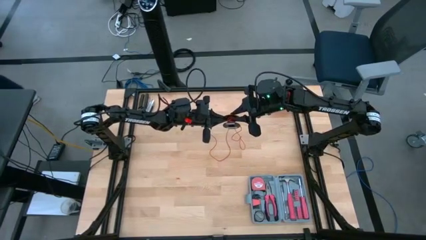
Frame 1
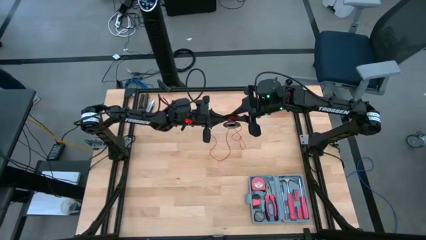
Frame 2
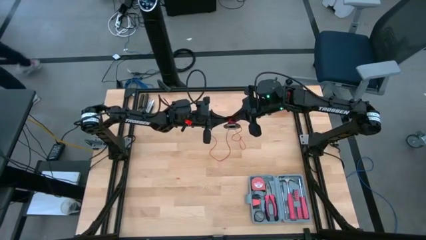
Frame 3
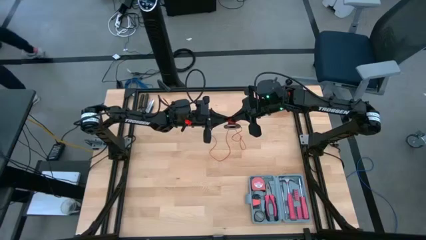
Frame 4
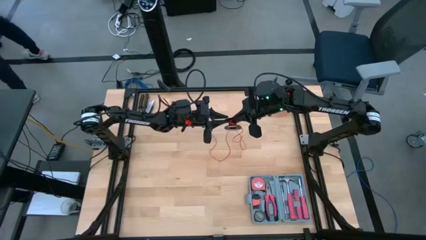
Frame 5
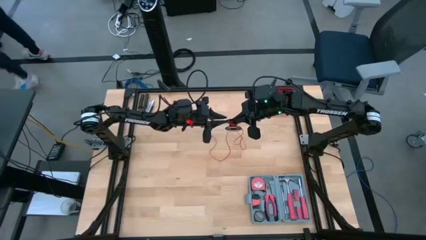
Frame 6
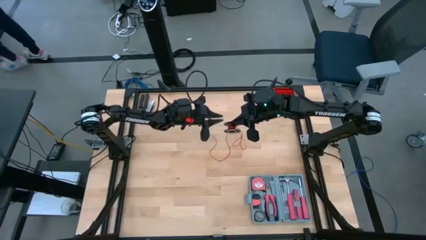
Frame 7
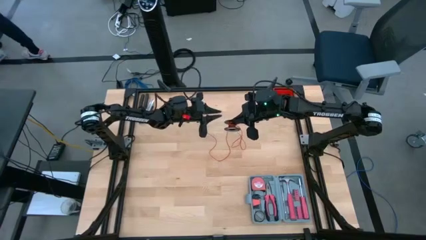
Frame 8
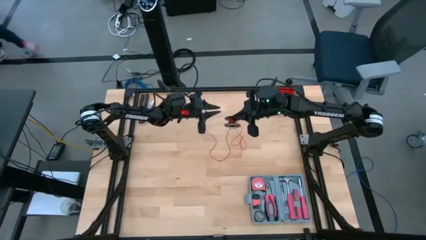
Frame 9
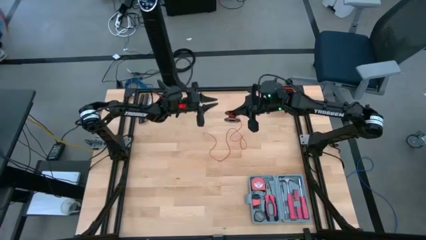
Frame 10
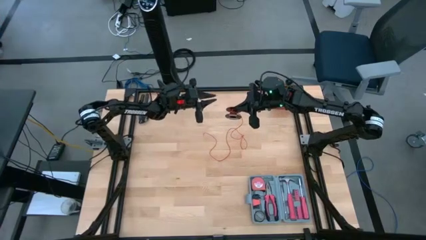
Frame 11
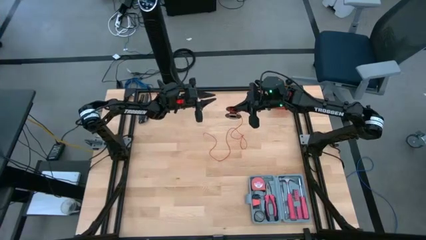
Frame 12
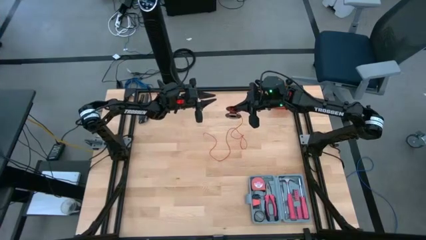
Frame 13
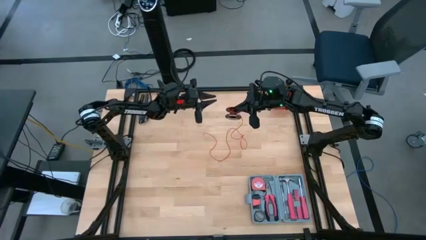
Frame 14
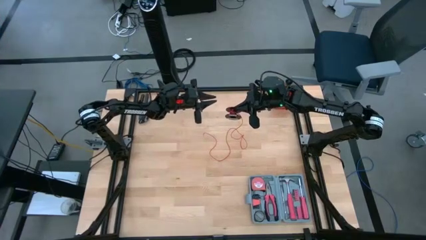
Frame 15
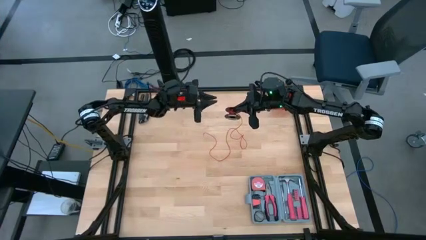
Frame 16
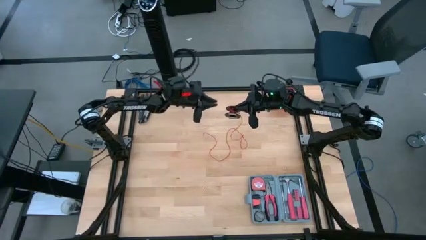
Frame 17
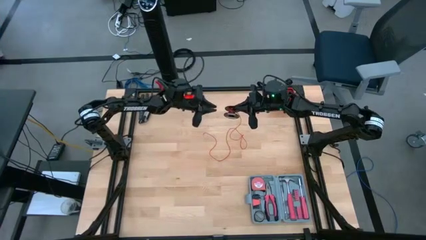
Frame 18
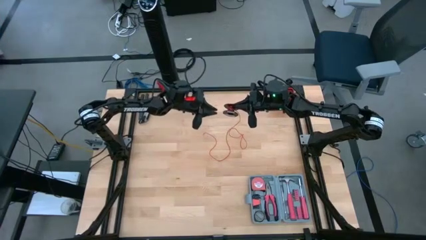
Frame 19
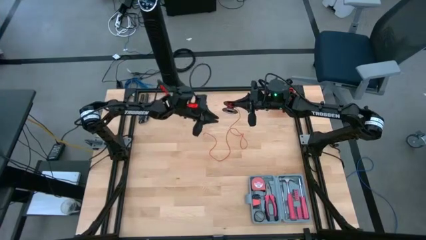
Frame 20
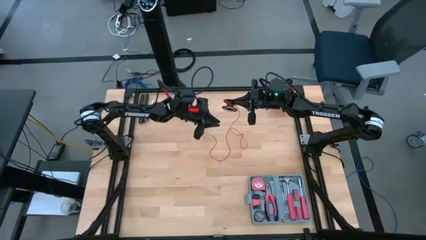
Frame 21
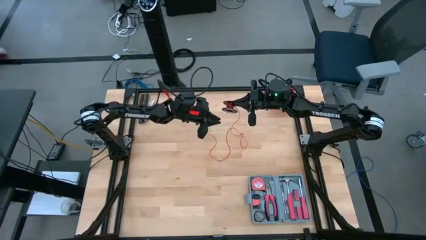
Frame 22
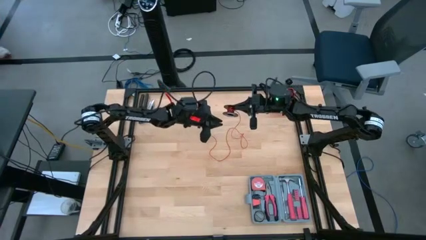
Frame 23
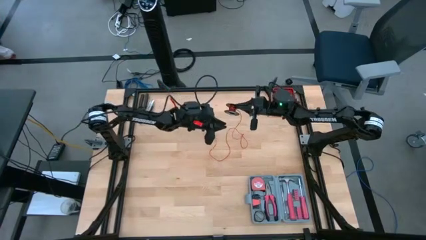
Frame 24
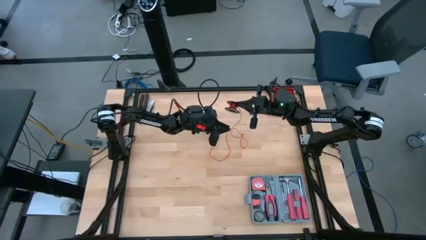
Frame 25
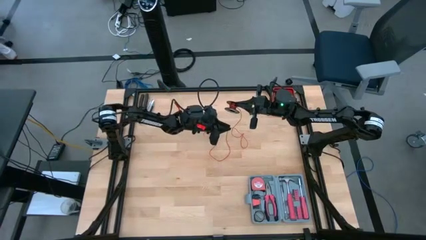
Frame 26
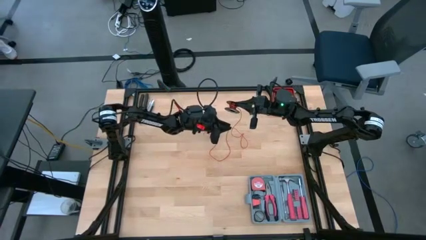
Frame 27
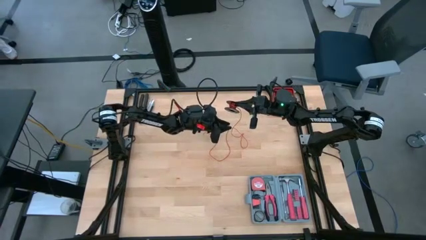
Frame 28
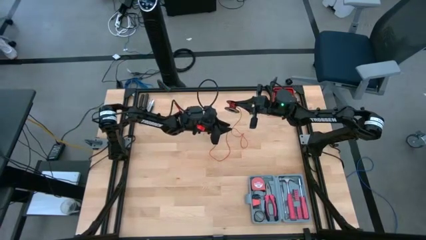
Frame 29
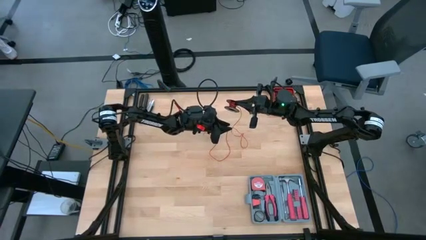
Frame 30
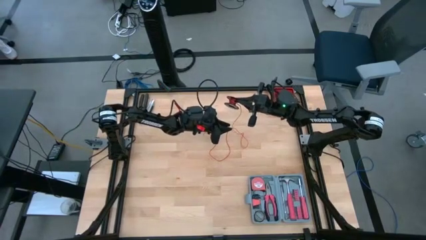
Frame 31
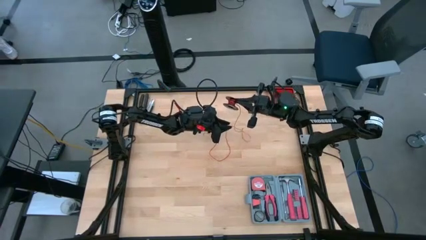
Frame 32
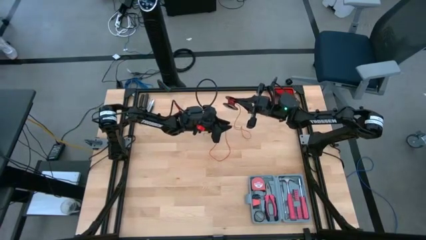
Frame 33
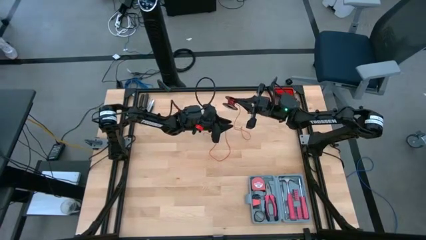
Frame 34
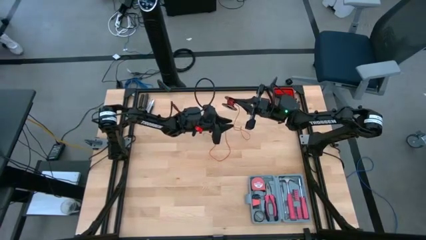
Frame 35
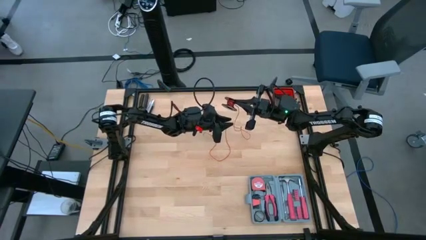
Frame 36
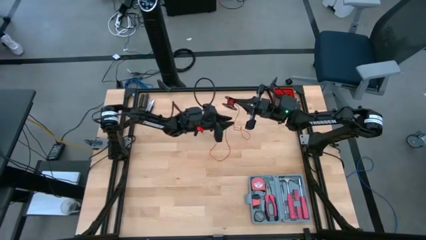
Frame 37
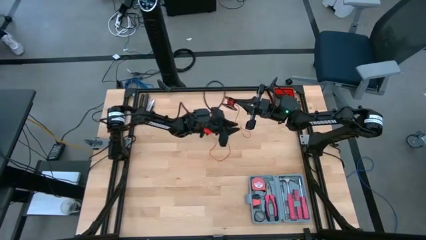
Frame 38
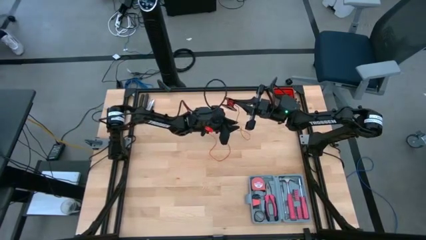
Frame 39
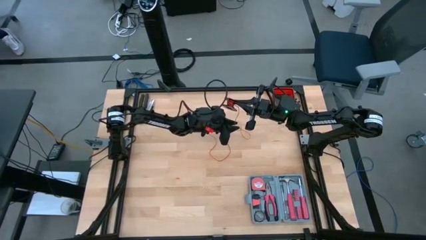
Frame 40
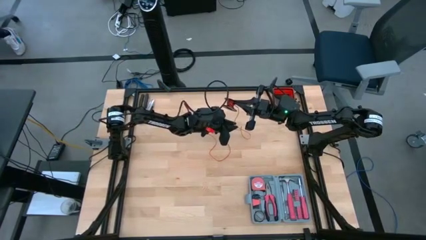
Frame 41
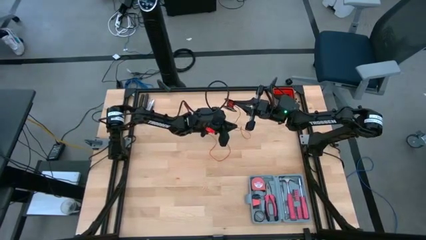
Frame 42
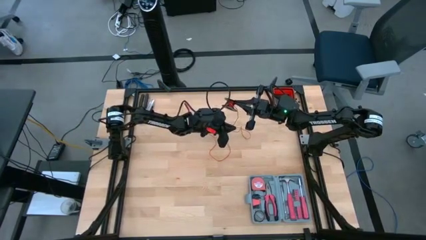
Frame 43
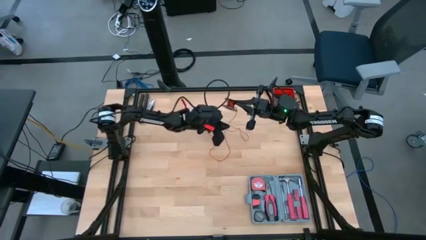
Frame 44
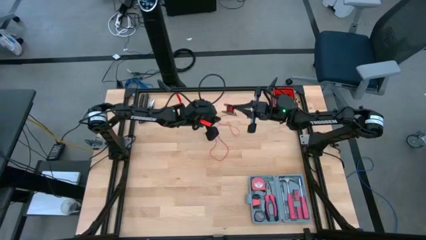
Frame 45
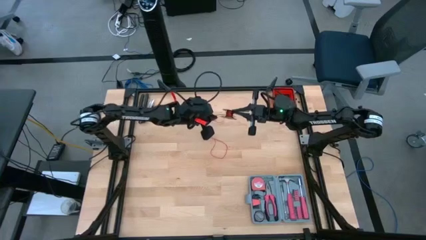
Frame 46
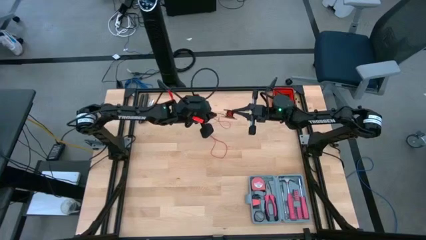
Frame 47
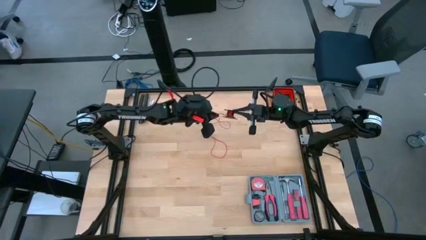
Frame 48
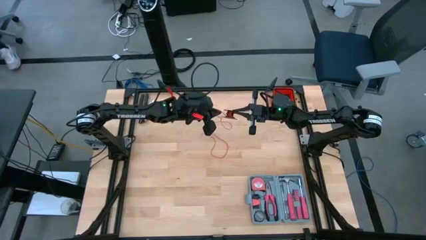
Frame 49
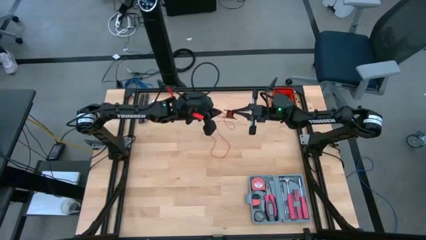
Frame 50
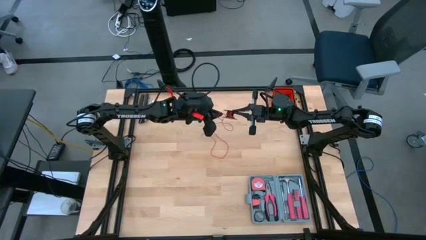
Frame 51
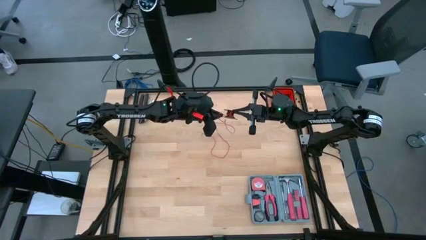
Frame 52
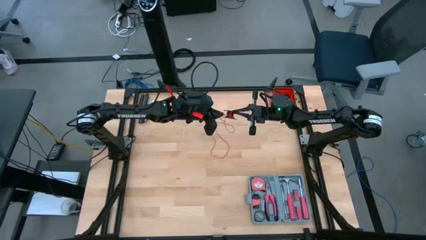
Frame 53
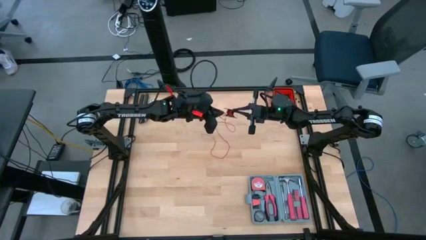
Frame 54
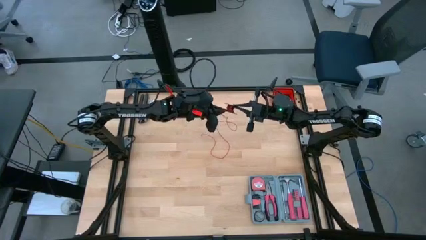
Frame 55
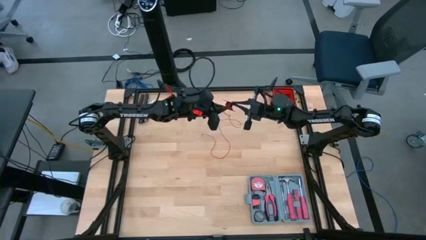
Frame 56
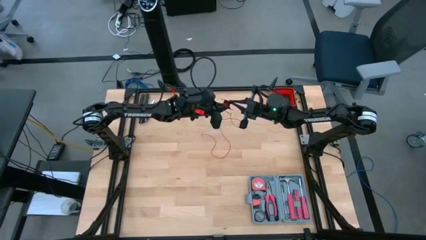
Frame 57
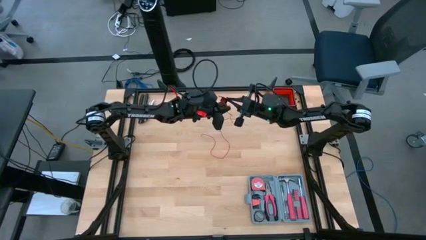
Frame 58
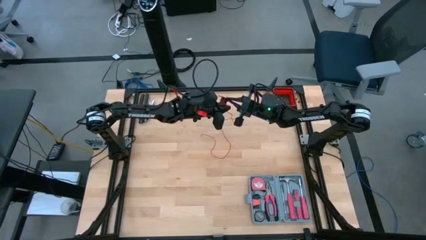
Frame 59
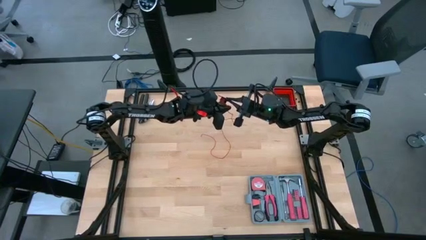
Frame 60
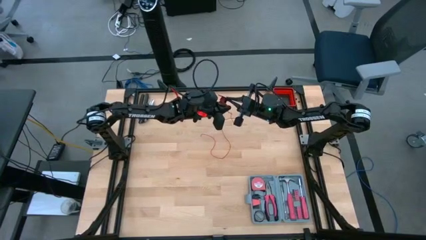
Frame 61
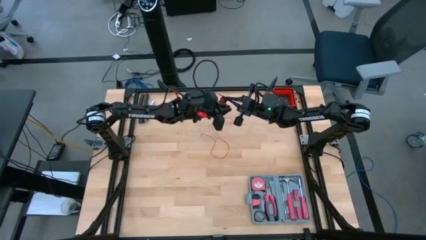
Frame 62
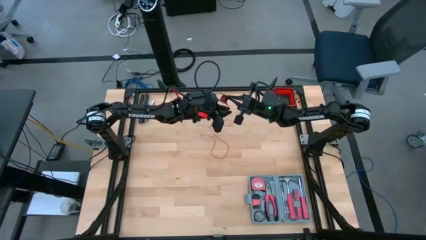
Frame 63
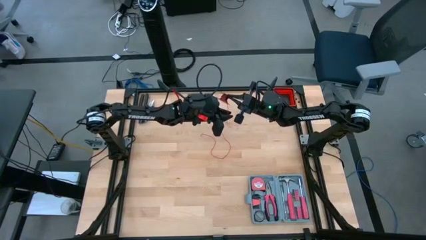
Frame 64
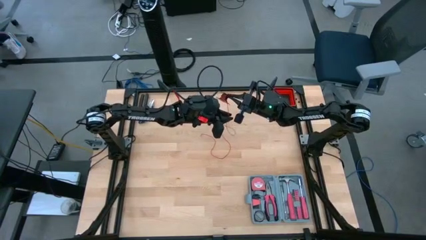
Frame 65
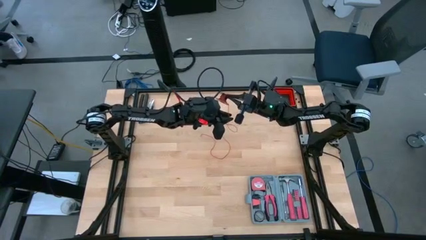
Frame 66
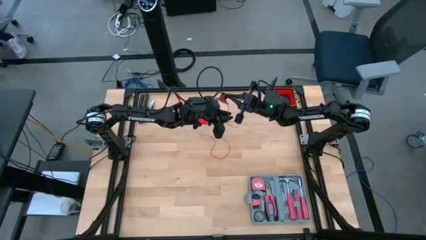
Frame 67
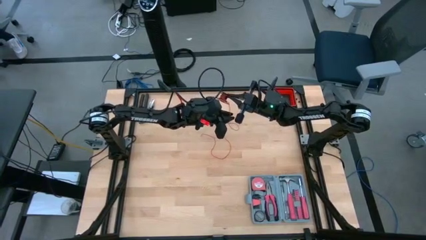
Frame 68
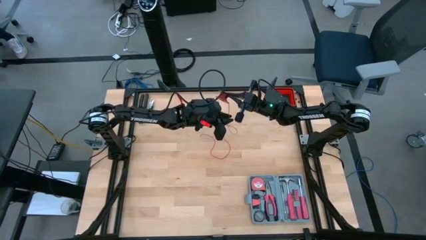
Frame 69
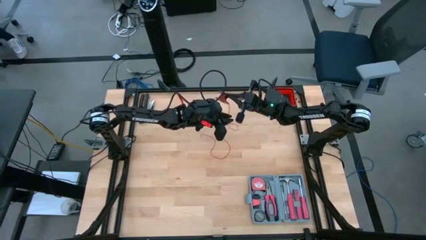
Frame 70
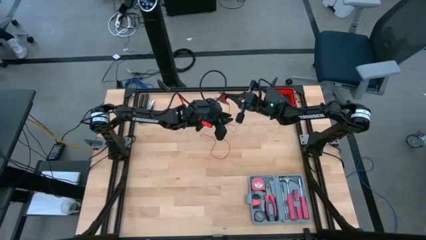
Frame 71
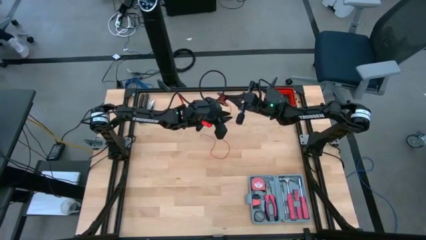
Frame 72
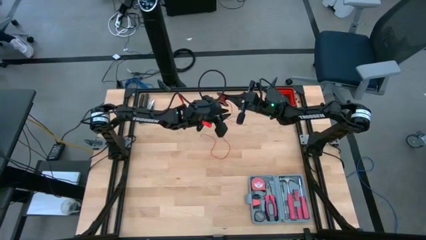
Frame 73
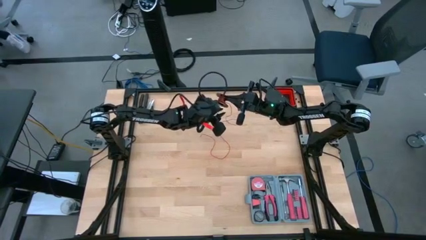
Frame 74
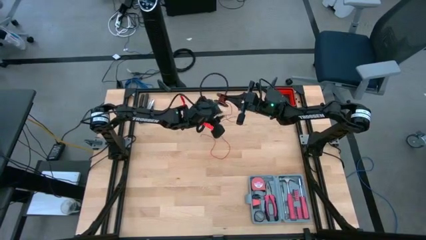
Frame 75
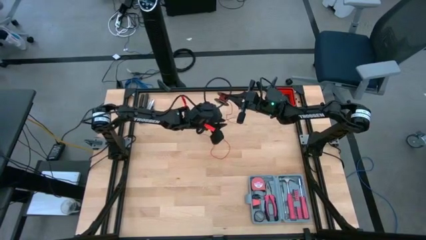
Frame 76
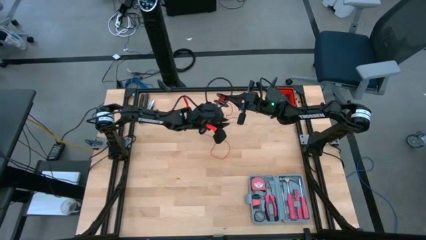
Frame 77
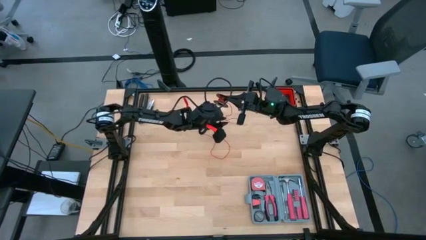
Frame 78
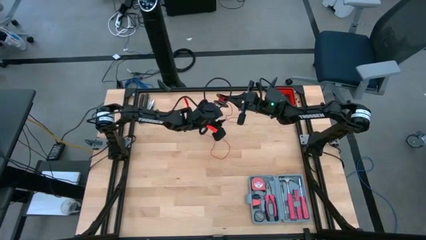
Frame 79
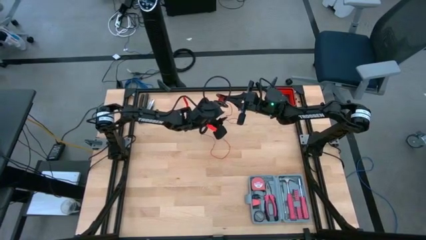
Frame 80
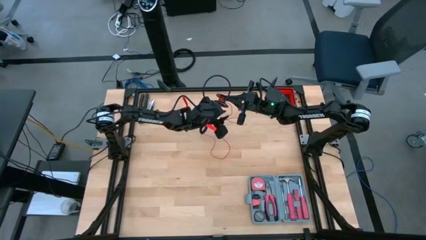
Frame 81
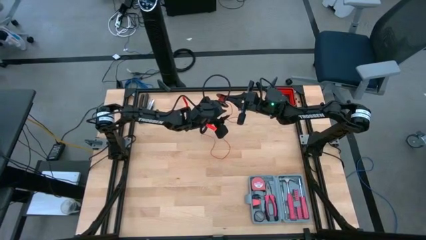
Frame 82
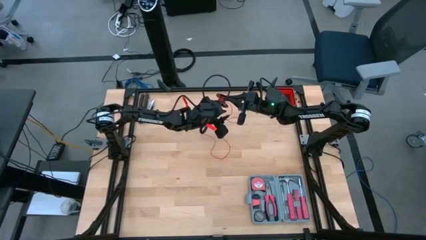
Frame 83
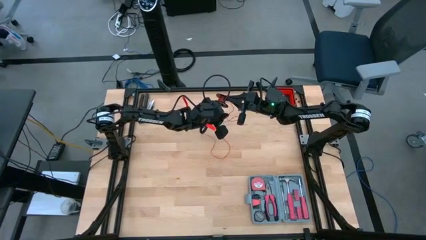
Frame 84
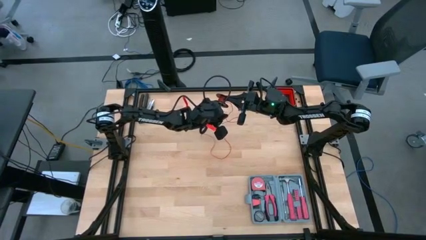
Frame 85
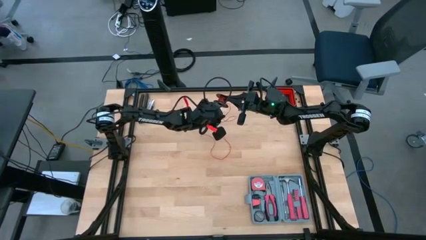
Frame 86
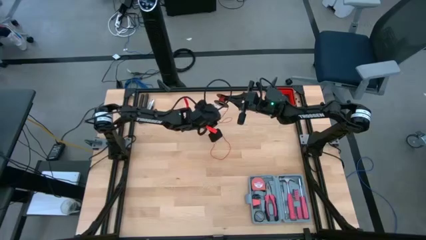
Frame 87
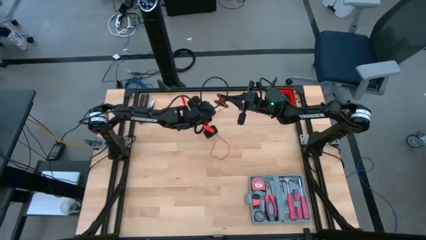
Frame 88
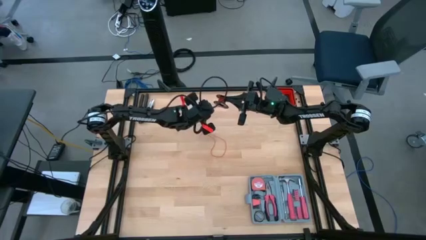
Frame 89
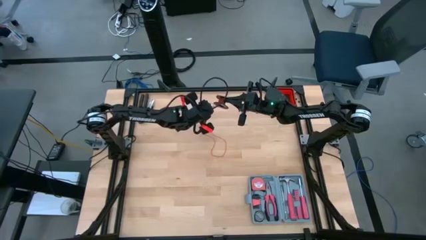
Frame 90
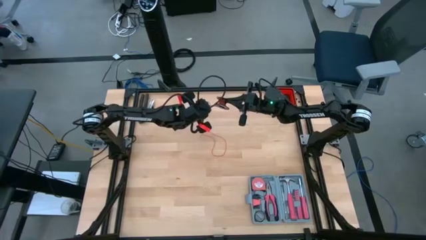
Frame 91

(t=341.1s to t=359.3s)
Task: Coil cords
Coil the wire
